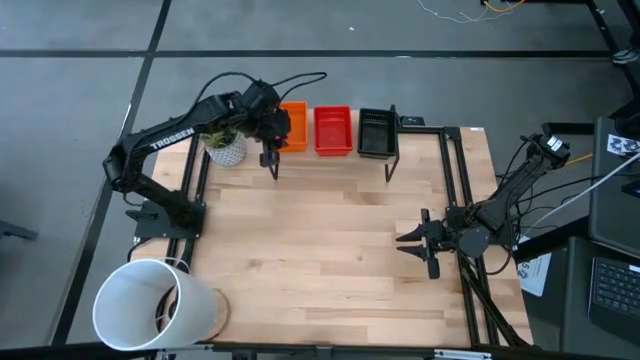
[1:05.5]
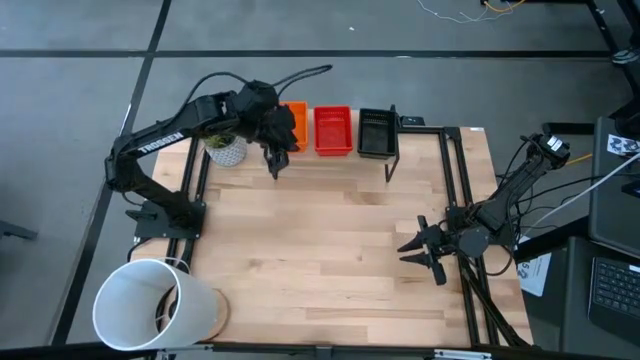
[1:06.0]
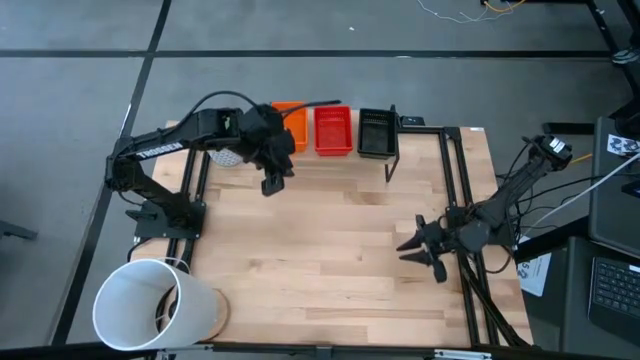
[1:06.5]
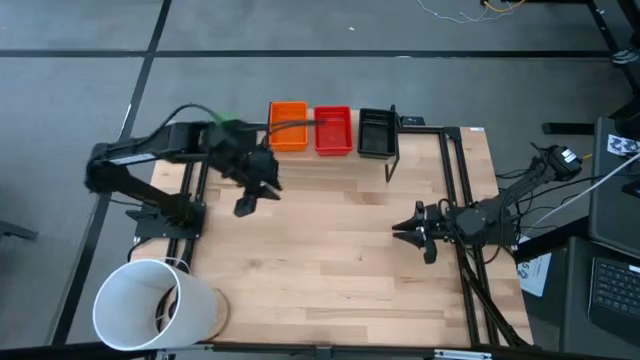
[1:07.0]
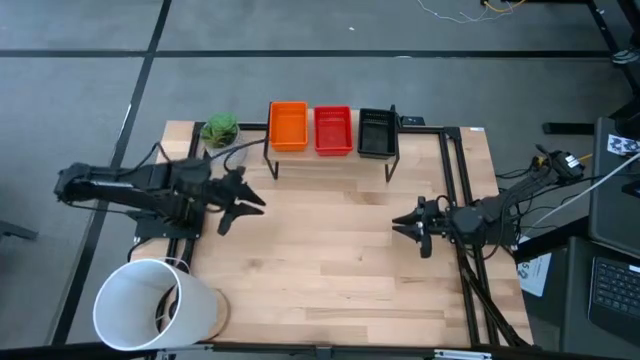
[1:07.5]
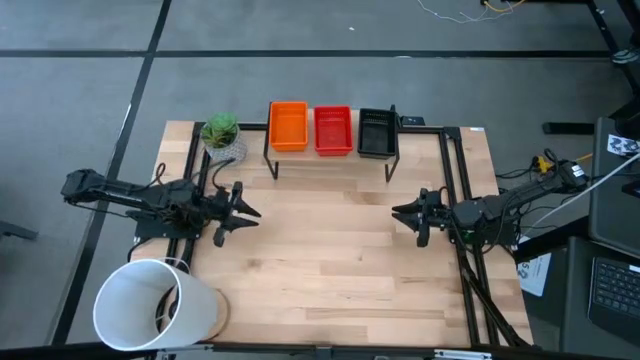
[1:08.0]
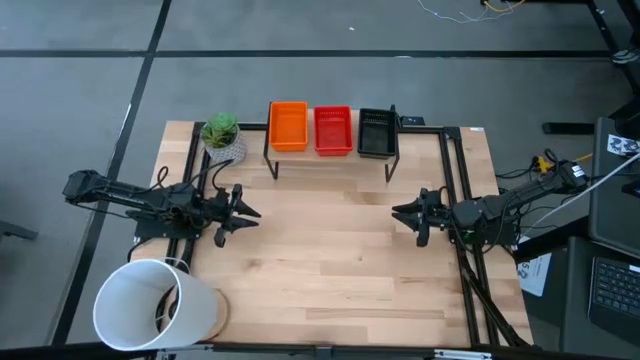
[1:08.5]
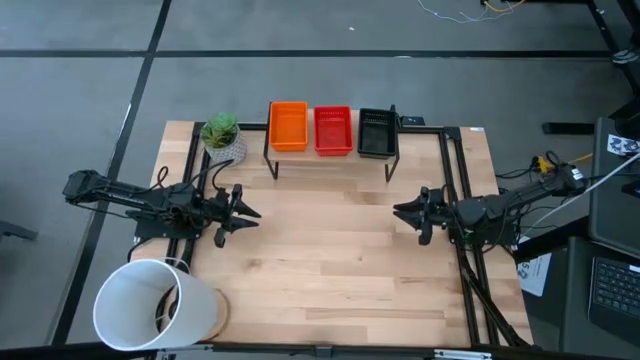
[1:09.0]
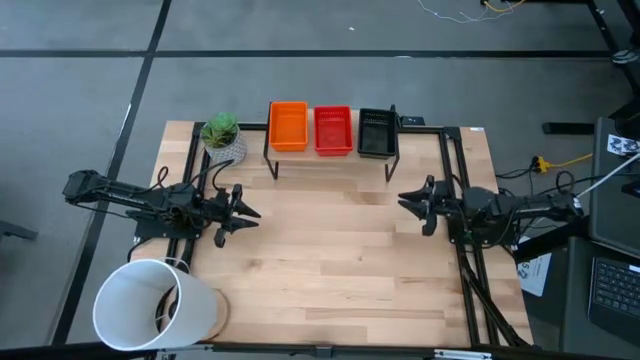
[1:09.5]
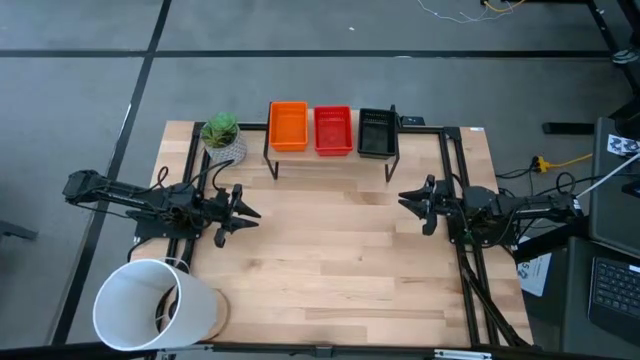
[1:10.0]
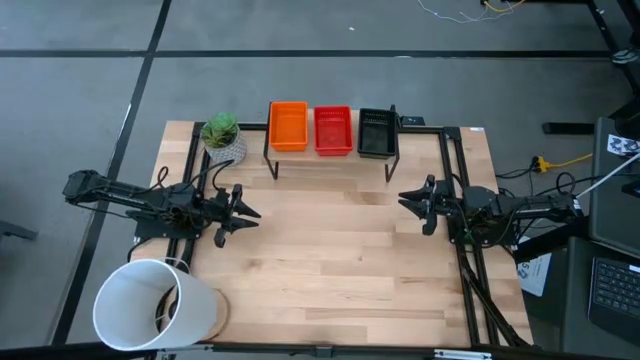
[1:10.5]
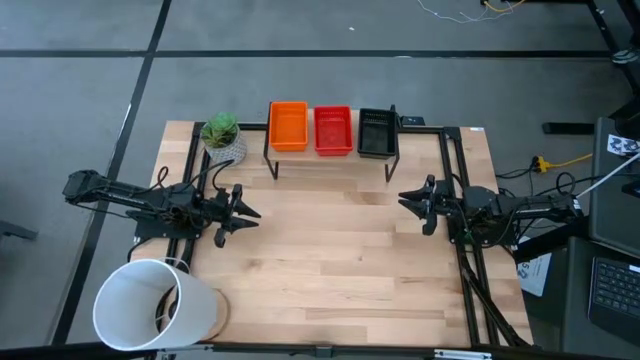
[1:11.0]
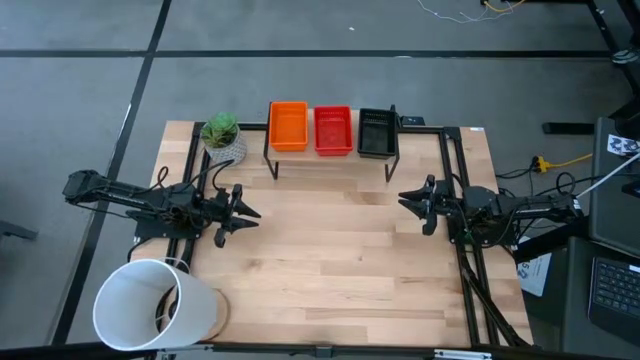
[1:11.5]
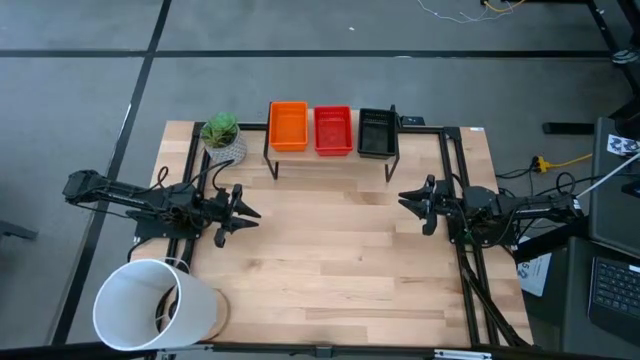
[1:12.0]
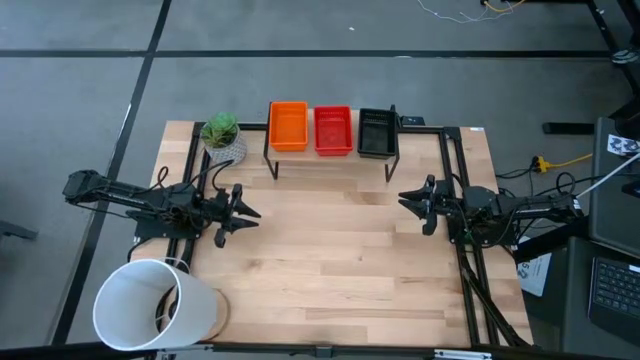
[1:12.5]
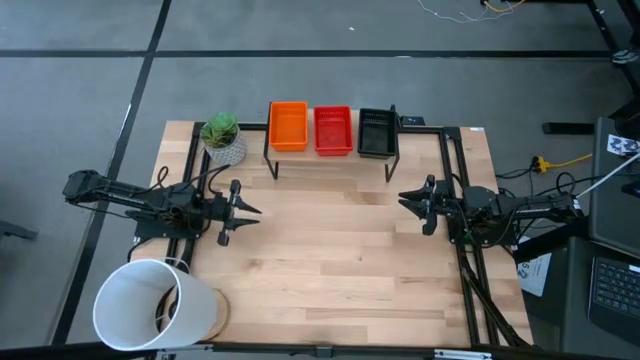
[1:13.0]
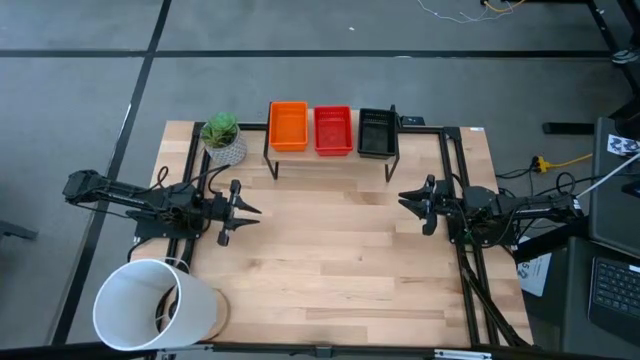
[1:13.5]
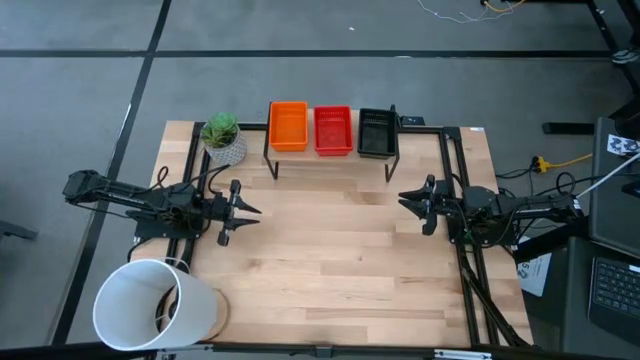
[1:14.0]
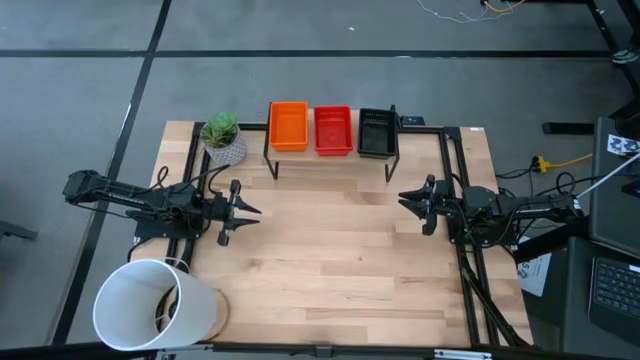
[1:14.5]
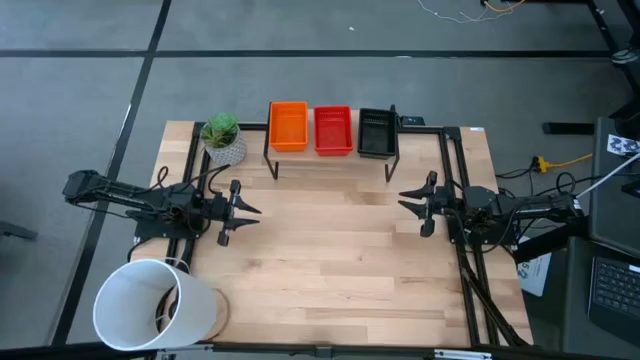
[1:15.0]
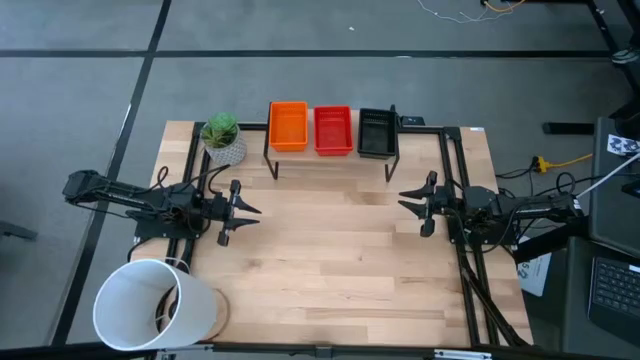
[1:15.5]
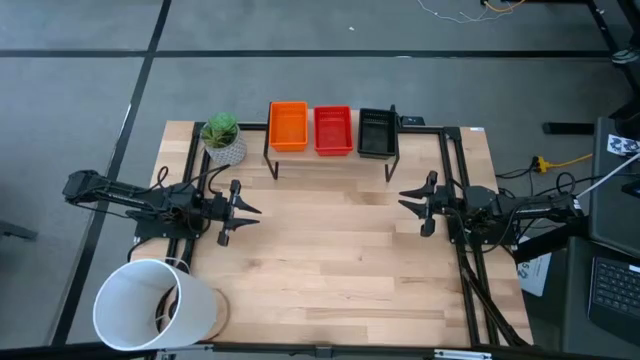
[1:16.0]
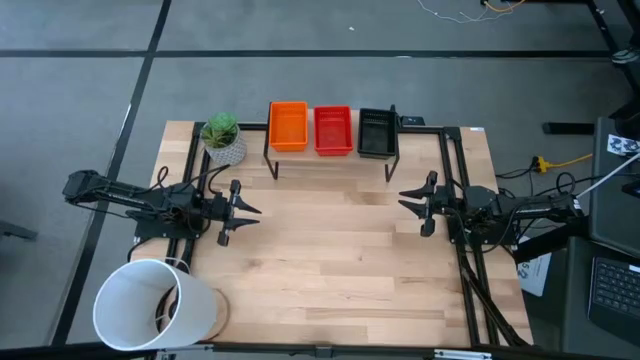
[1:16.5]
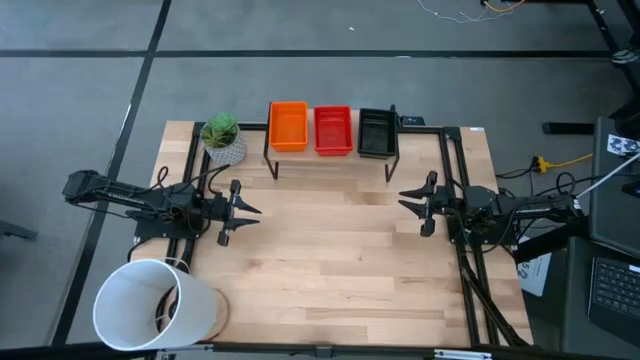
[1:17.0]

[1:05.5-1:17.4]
Task: Stack baskets on shelf by color
Return to Home Position

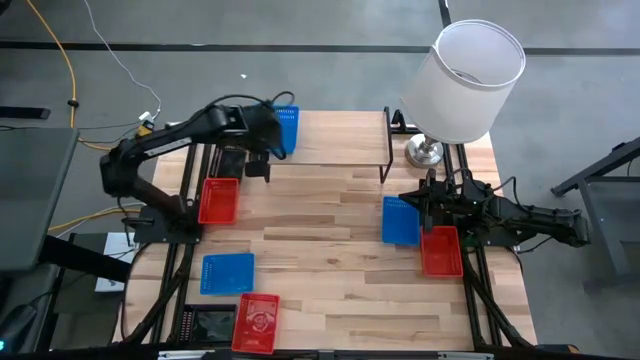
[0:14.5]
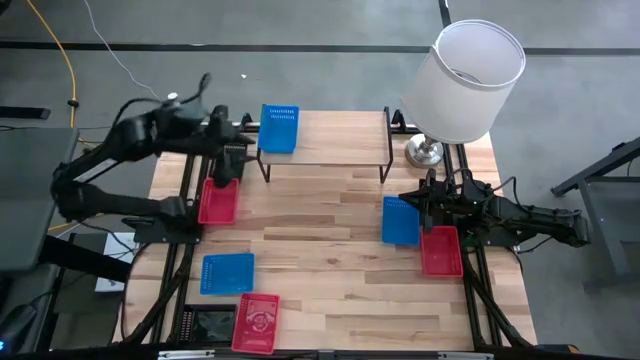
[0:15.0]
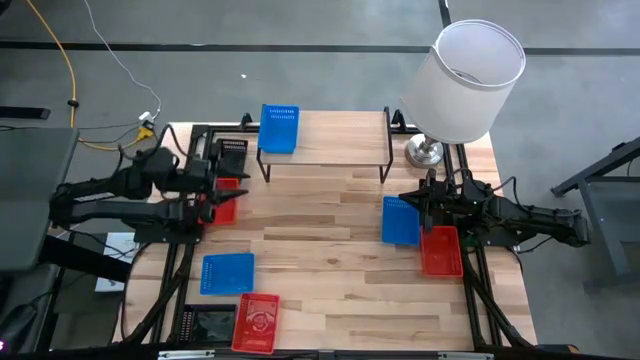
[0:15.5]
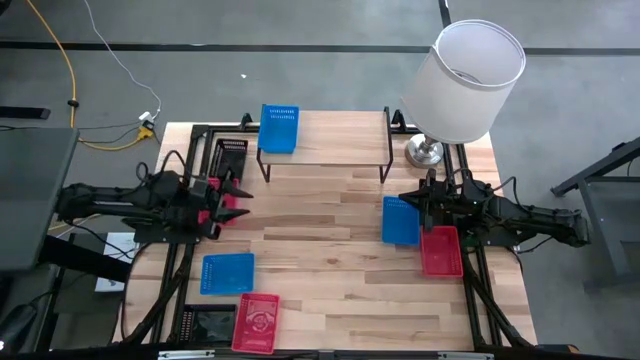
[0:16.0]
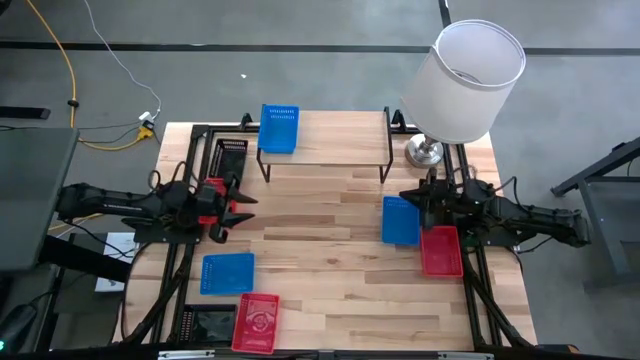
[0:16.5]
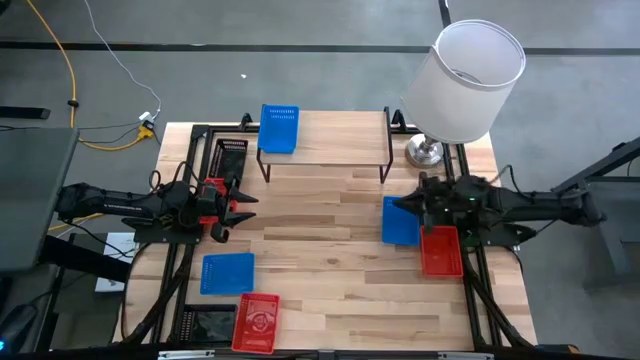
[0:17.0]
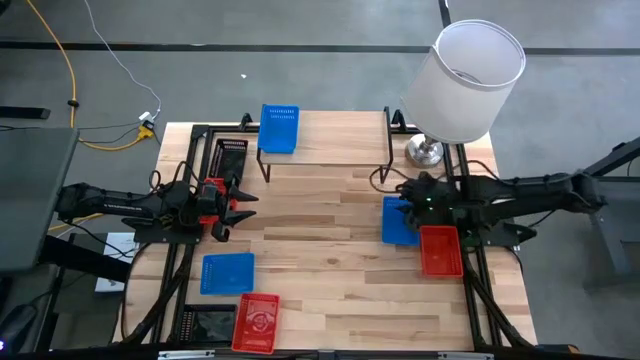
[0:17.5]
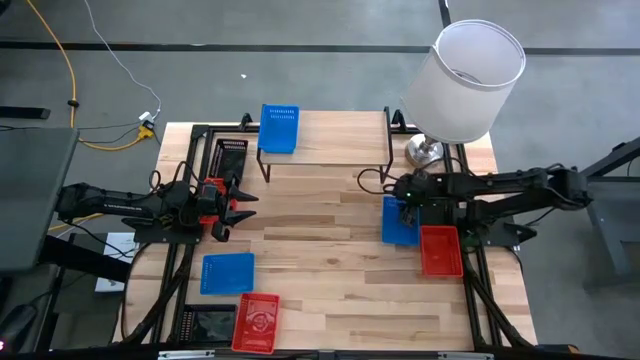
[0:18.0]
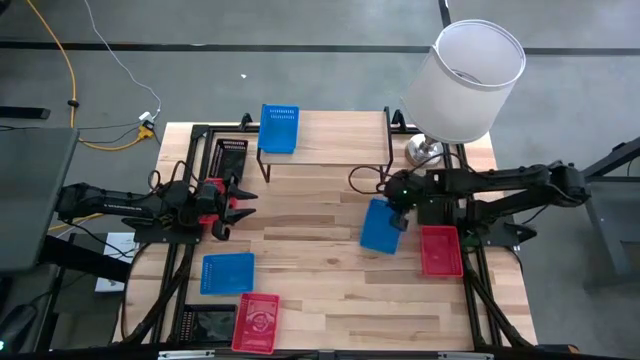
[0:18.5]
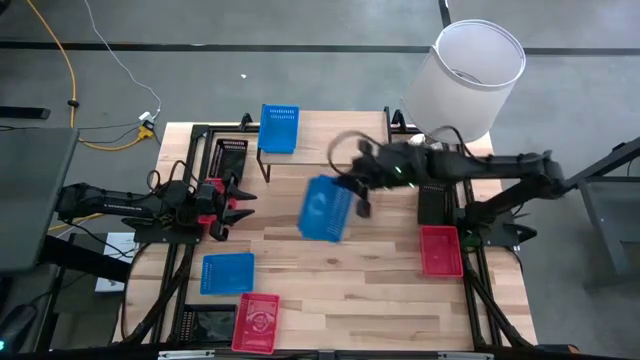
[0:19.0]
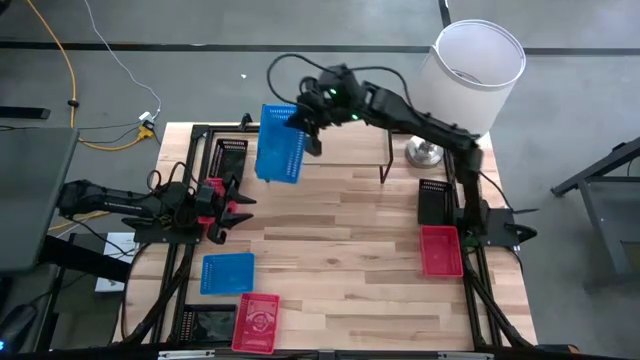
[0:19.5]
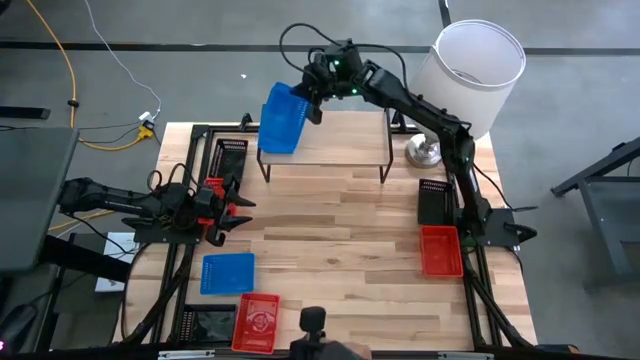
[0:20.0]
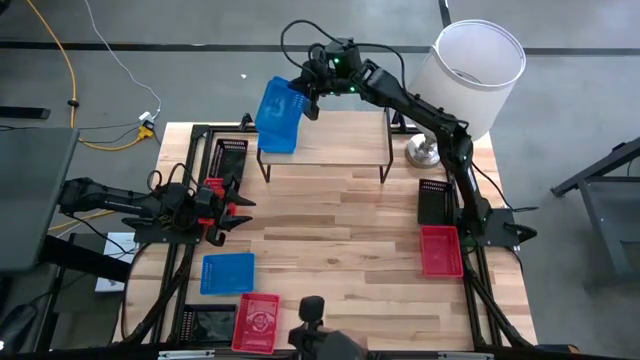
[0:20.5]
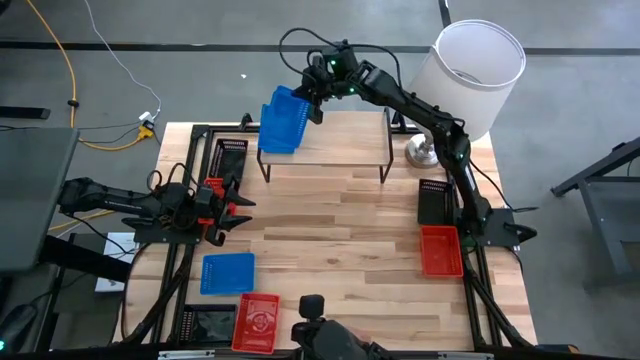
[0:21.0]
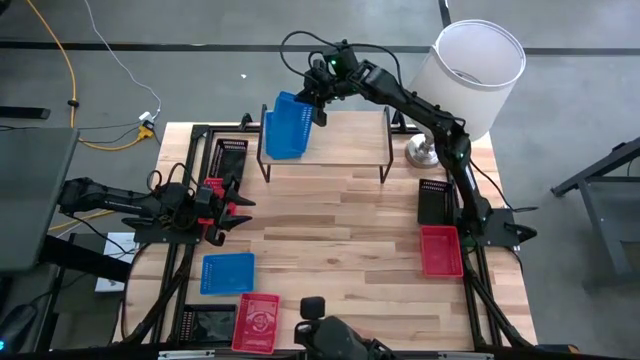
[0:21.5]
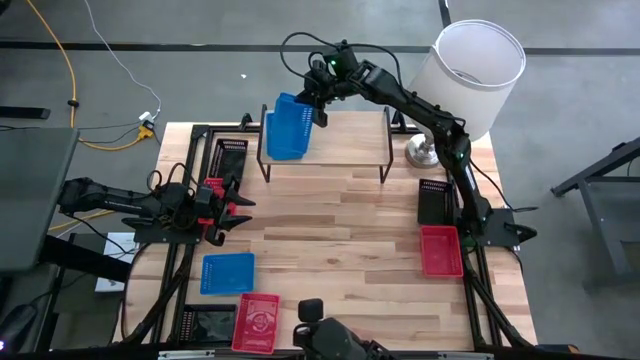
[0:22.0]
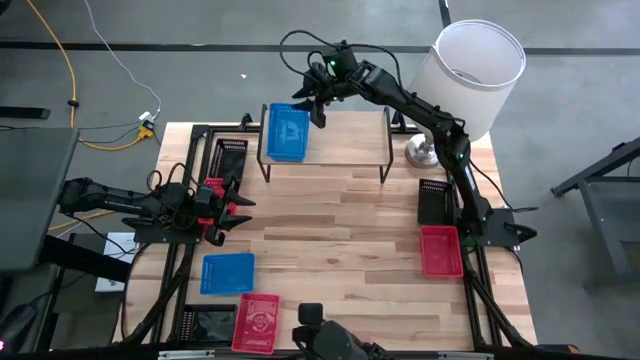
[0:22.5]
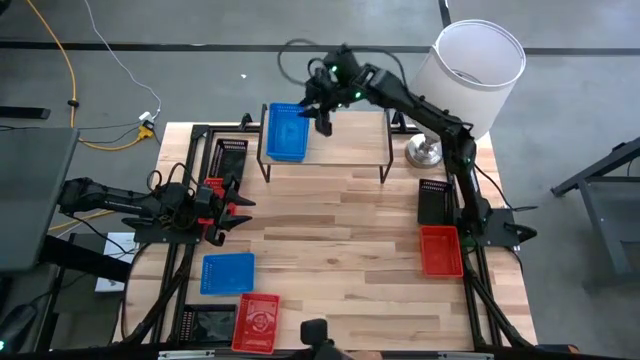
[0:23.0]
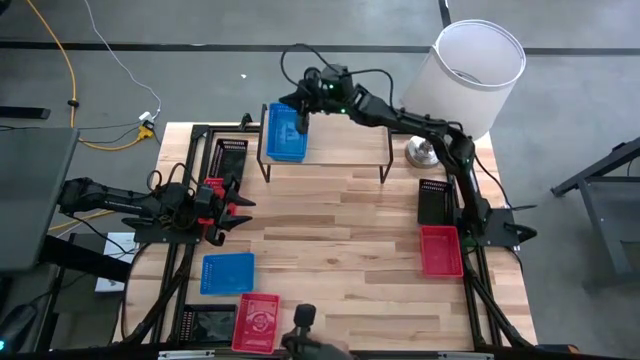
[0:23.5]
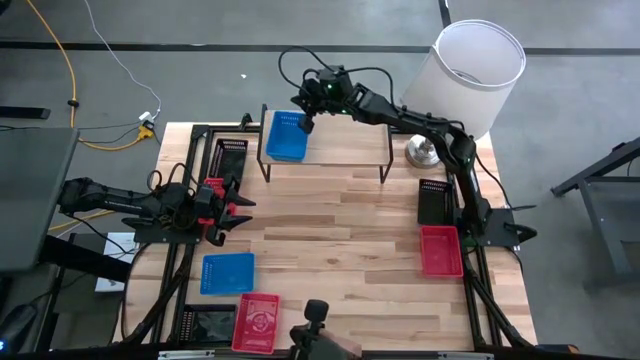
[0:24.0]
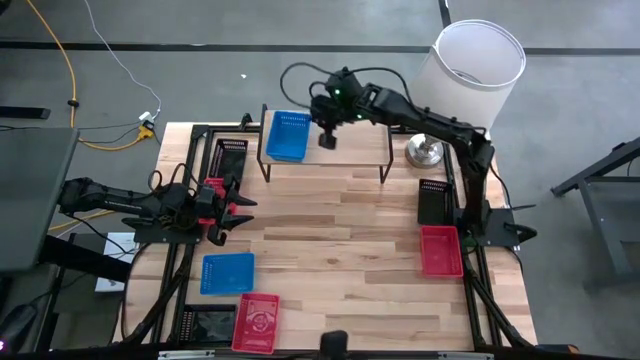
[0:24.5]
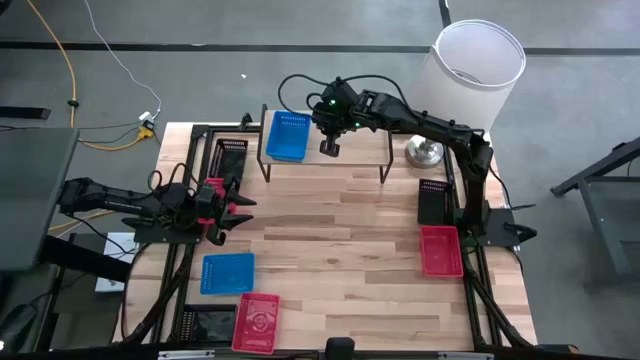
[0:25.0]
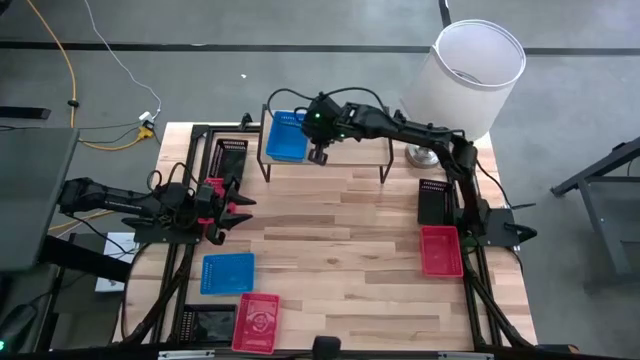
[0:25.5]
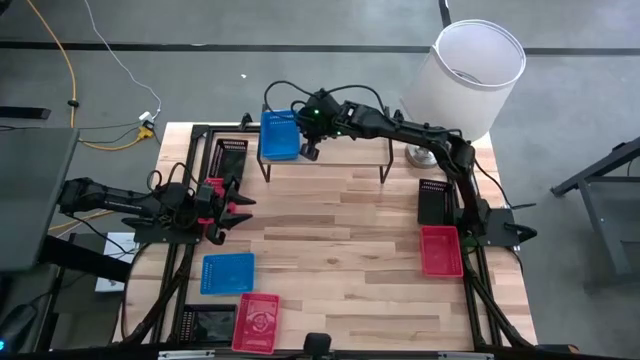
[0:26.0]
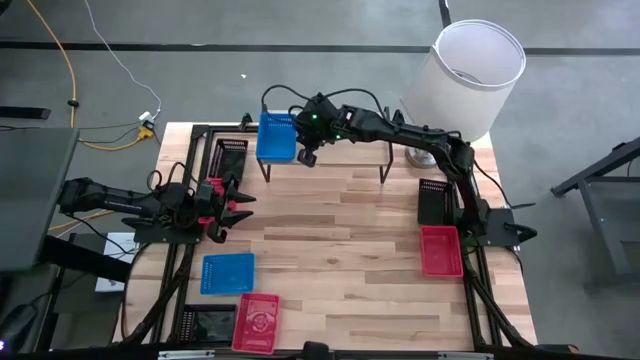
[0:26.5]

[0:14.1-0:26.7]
Task: Stack baskets on shelf by color
Stack the top blue bin on top of the blue bin on the shelf
